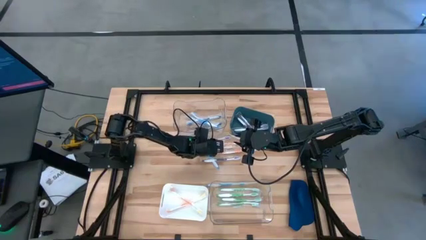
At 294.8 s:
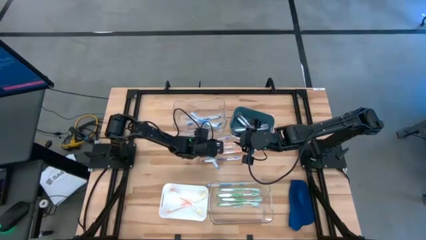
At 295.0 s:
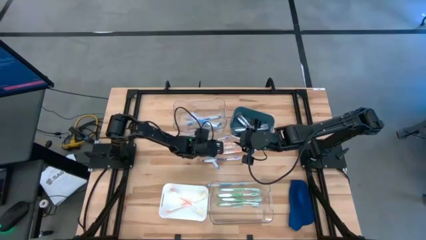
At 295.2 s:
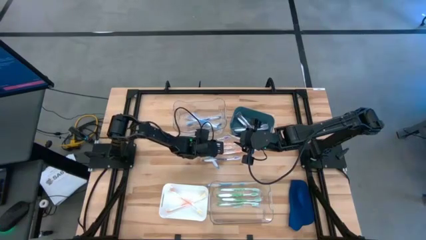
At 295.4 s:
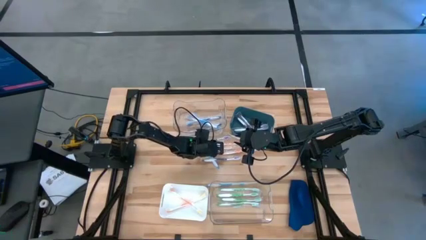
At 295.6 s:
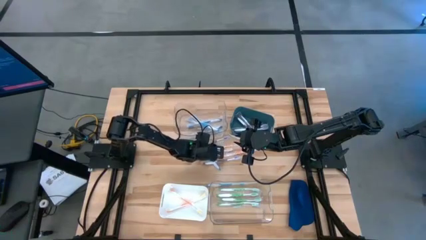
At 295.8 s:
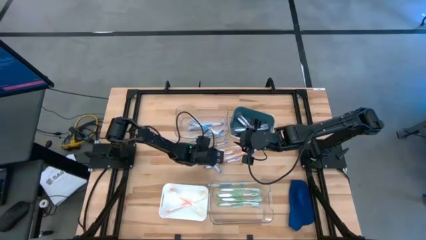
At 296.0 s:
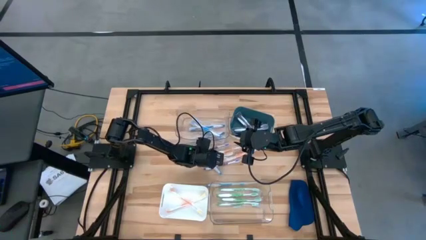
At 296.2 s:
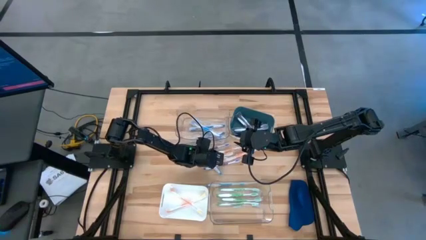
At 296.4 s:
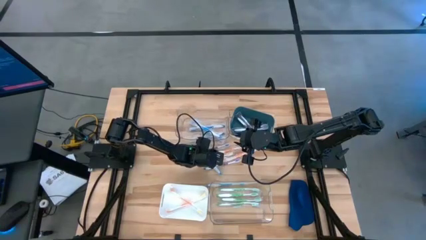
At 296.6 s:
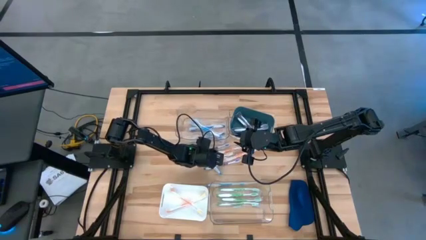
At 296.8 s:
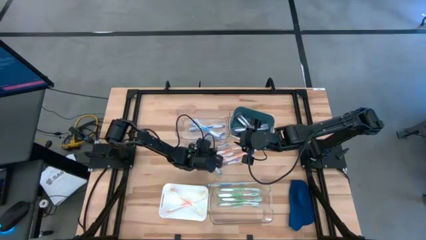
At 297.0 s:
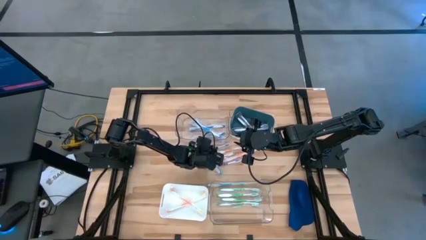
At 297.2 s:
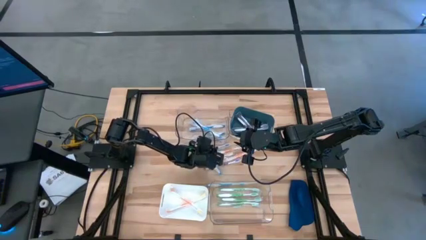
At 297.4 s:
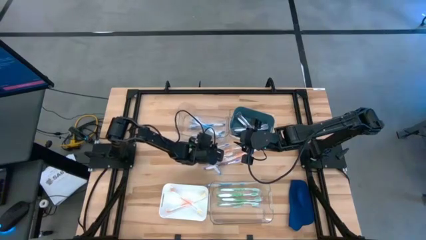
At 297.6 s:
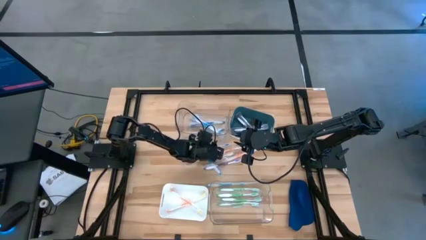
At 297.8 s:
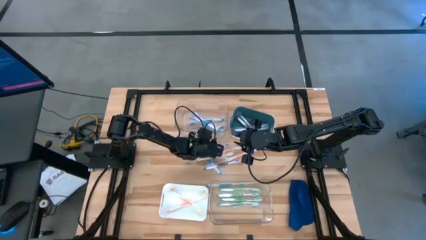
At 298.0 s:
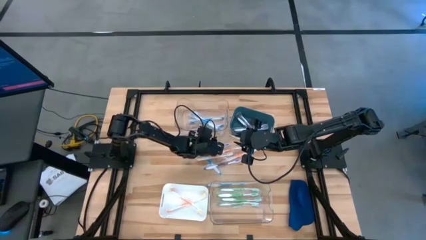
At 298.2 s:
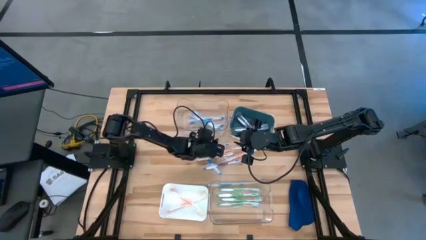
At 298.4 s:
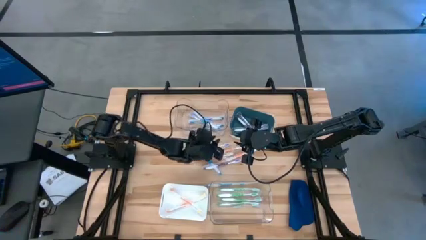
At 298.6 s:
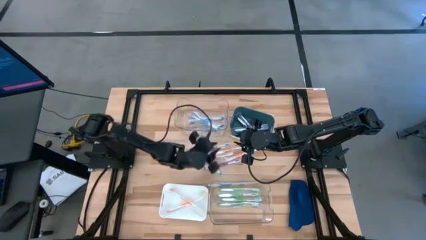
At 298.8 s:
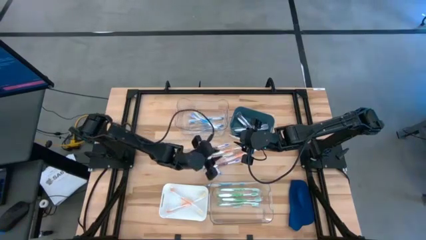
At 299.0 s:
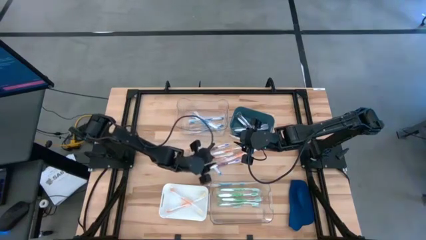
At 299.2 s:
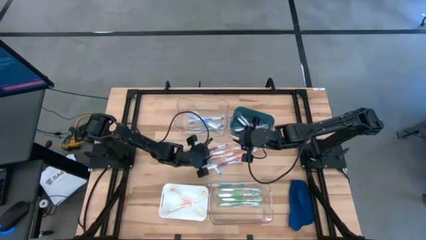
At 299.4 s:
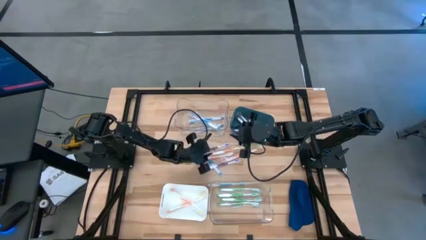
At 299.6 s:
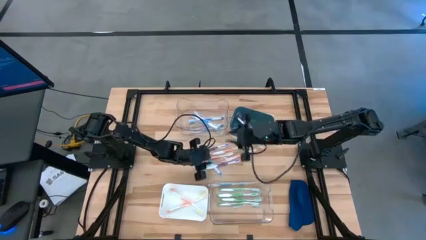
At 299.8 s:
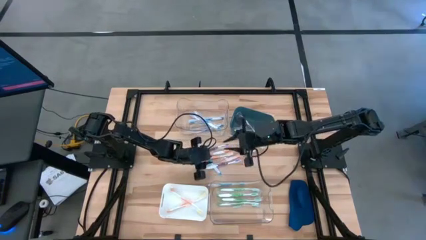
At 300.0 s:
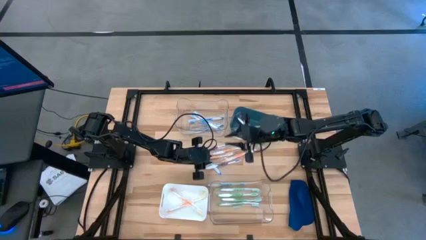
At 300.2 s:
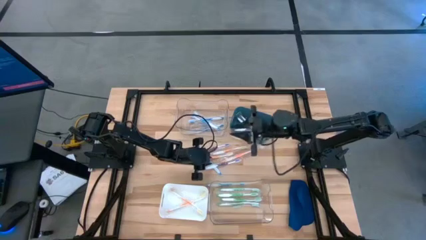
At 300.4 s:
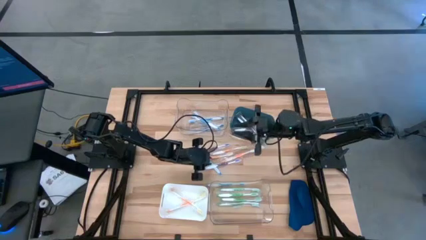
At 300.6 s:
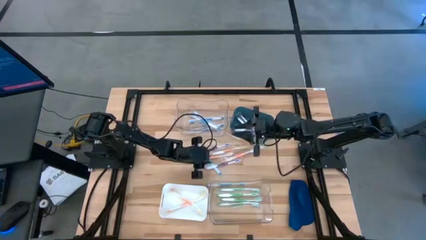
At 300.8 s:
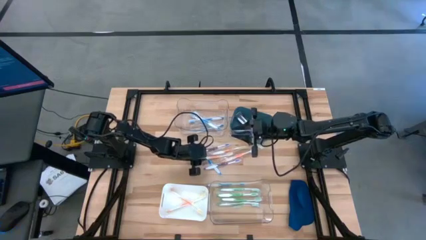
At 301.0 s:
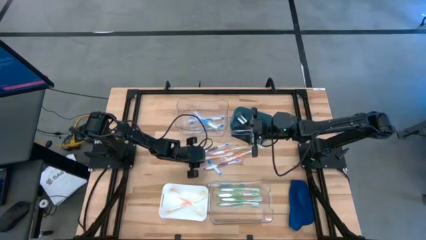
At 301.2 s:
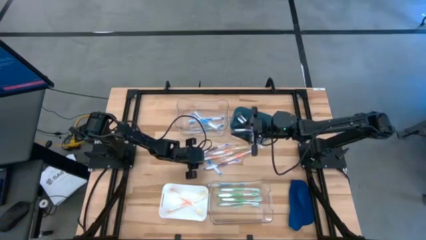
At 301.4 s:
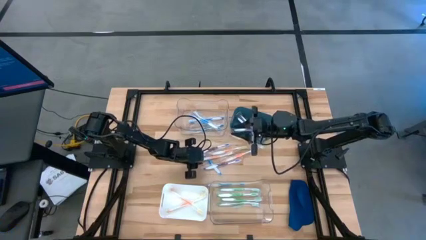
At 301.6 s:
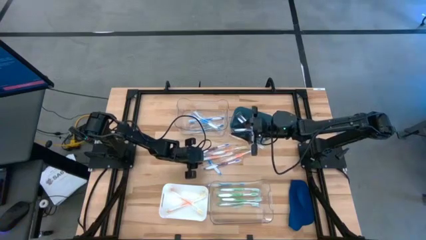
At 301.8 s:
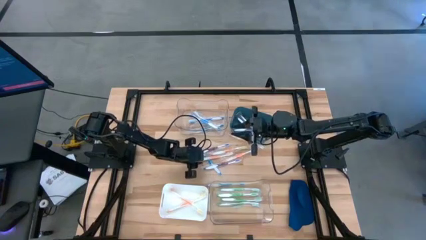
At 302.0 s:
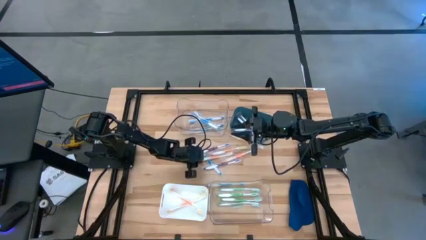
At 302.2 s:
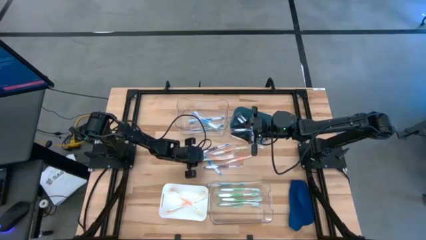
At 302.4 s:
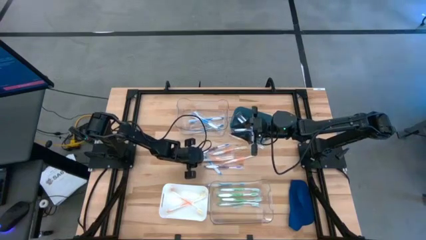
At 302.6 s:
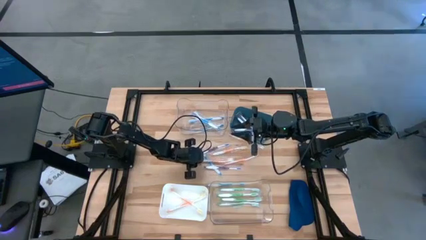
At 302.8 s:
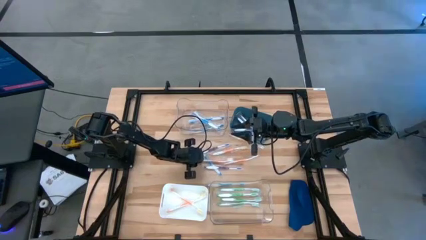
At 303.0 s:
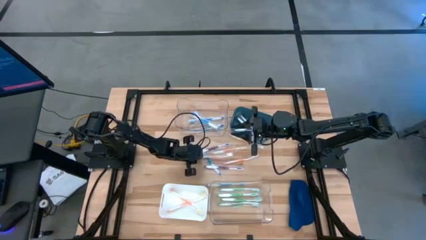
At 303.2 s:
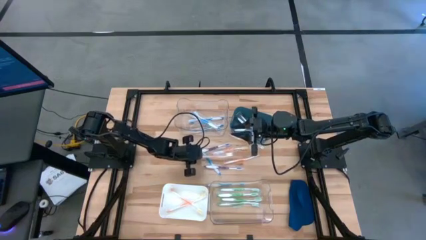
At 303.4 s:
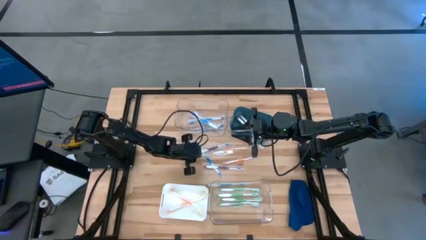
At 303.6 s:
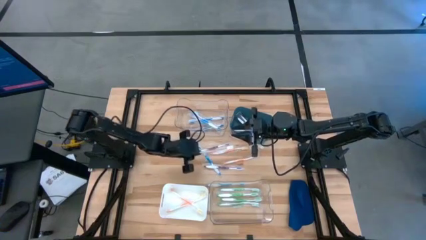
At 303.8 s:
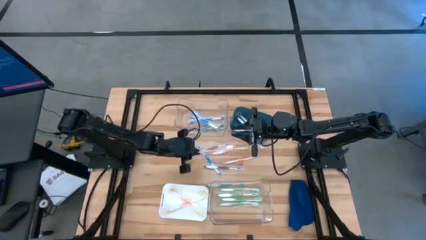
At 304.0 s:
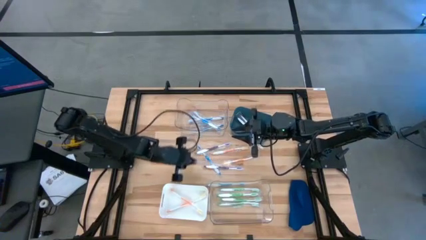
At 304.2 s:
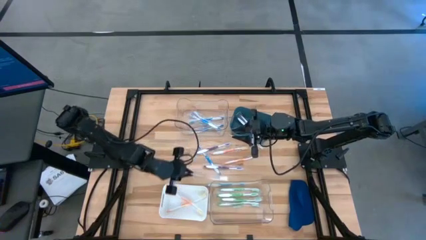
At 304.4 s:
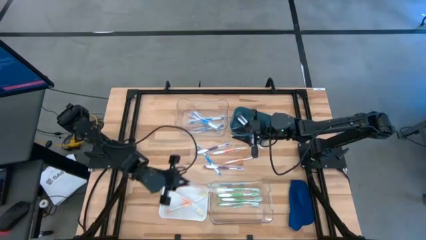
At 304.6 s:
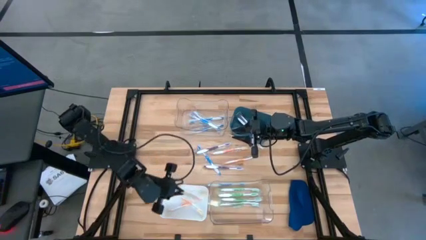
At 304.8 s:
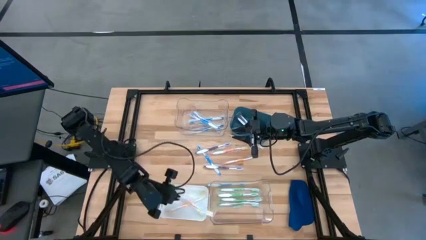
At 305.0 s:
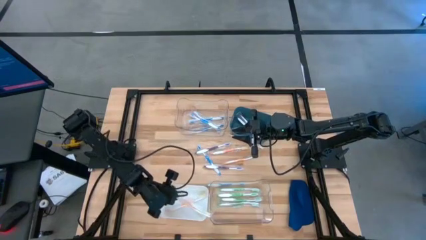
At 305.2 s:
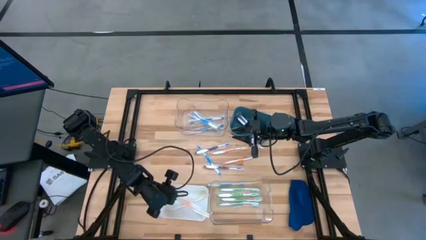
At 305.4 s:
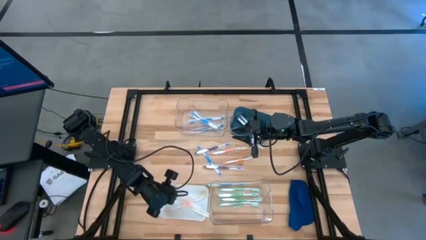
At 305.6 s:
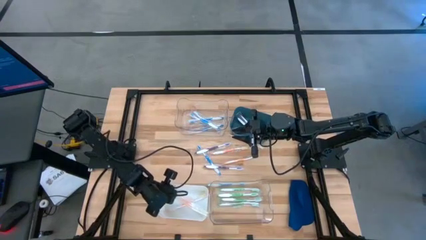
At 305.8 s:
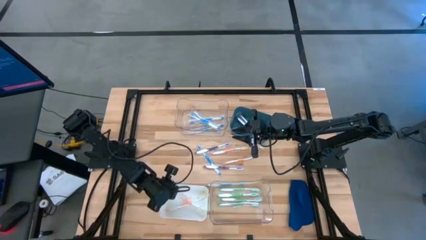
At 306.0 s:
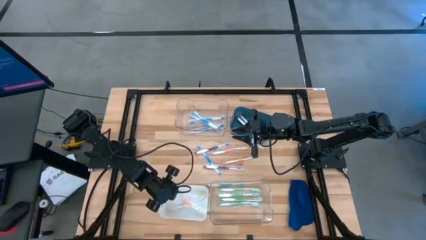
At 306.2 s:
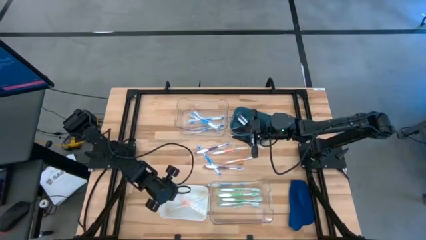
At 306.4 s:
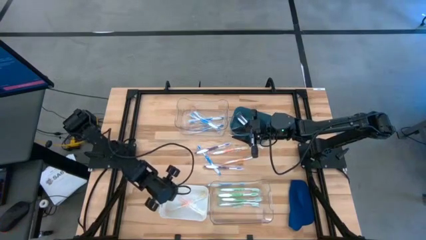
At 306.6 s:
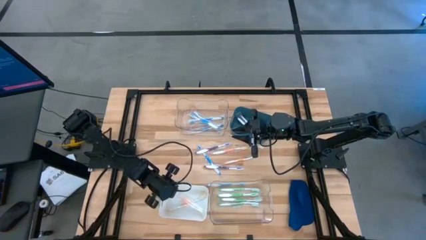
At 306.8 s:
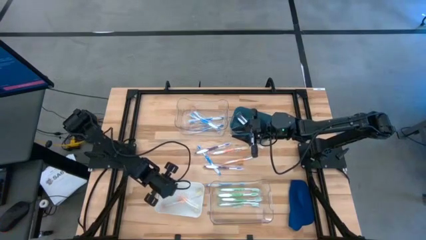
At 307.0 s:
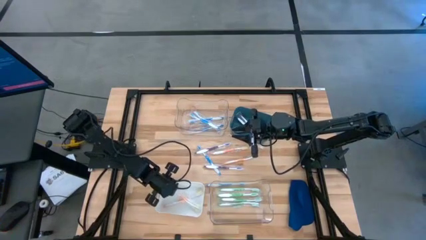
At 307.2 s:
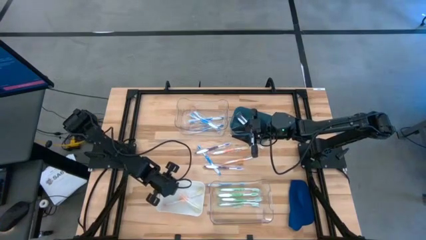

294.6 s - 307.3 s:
Task: Pick & Place Toothbrushes
Put the orange toothbrush into the white bin
